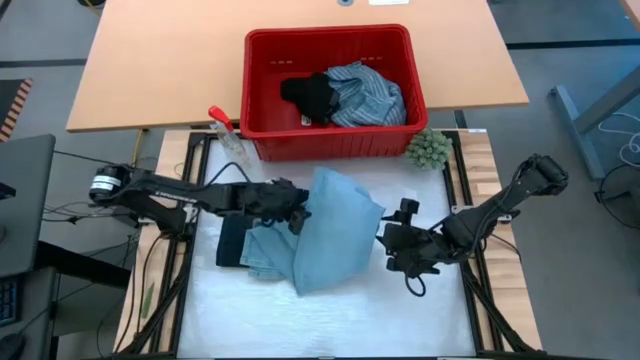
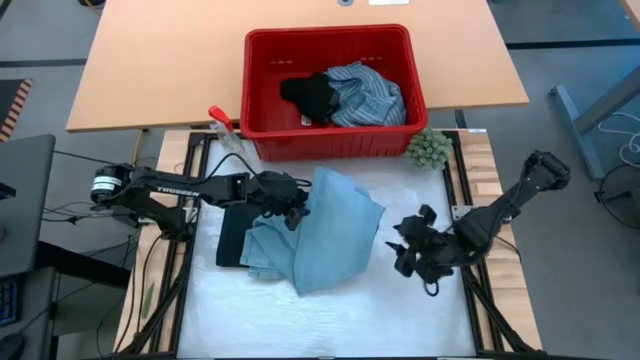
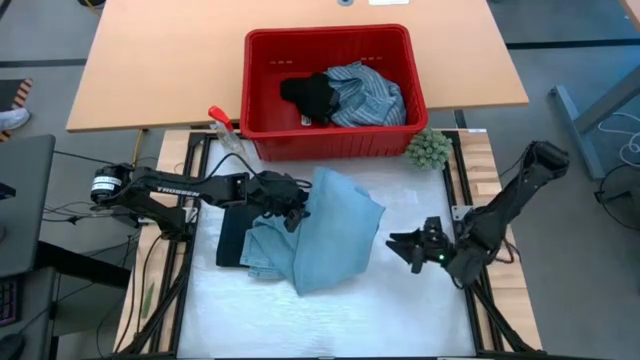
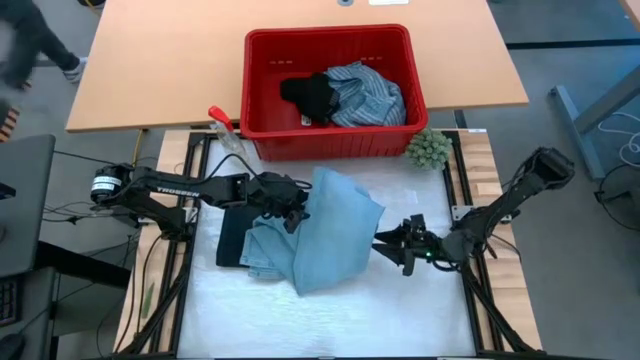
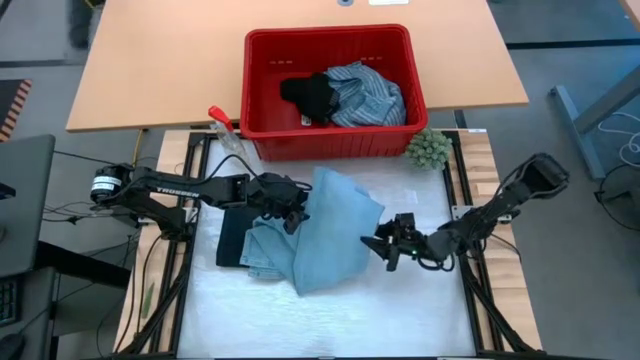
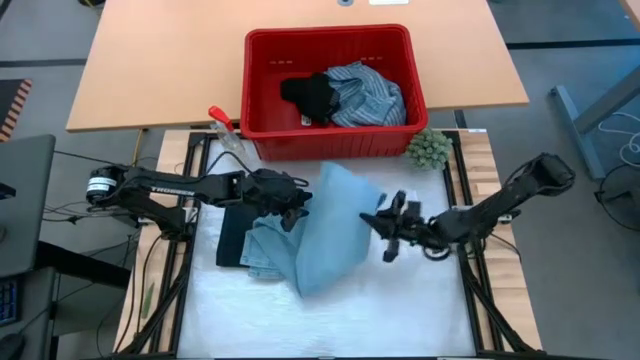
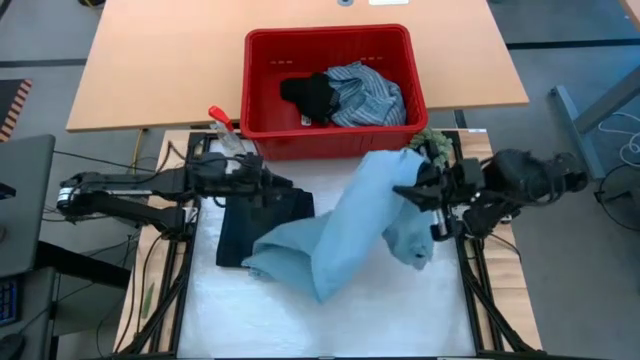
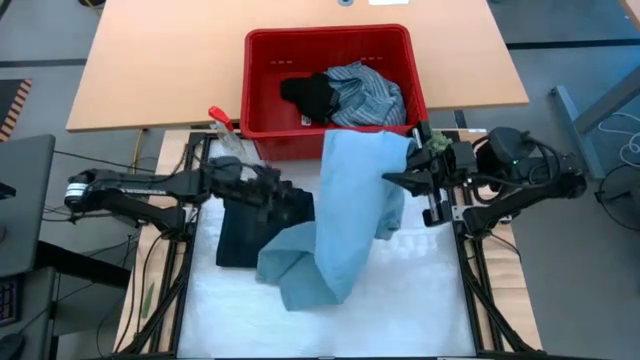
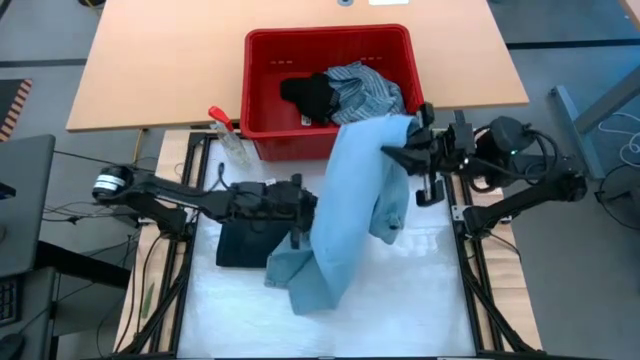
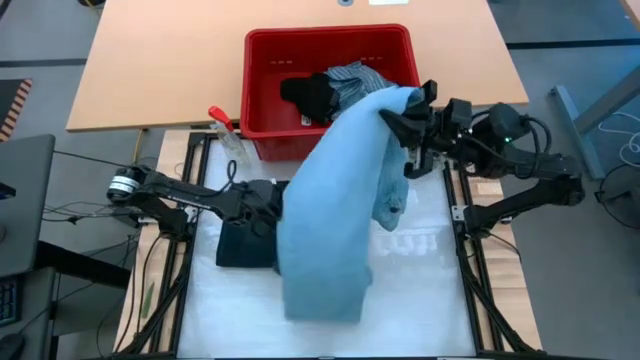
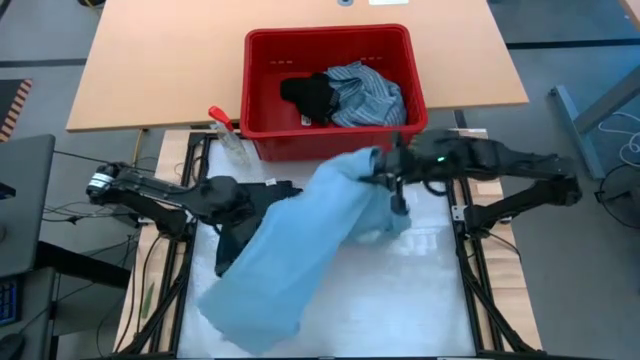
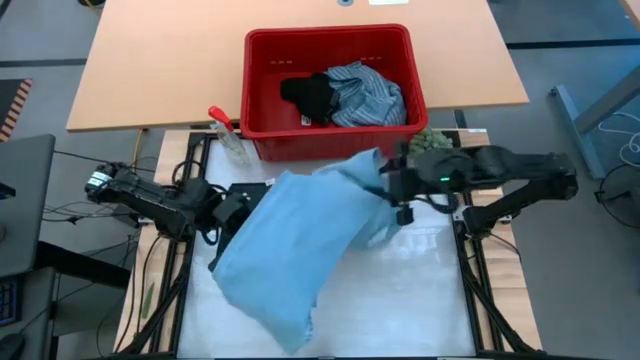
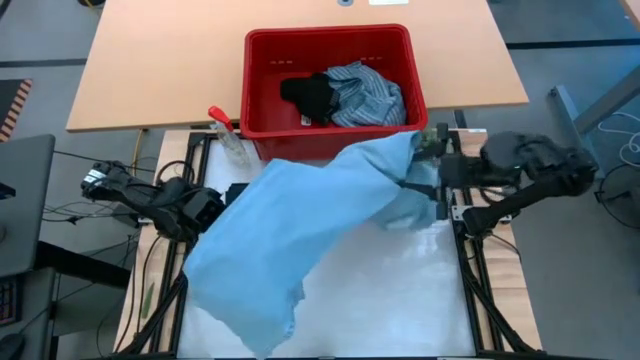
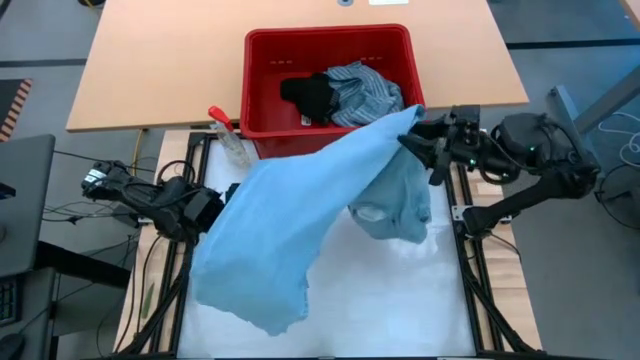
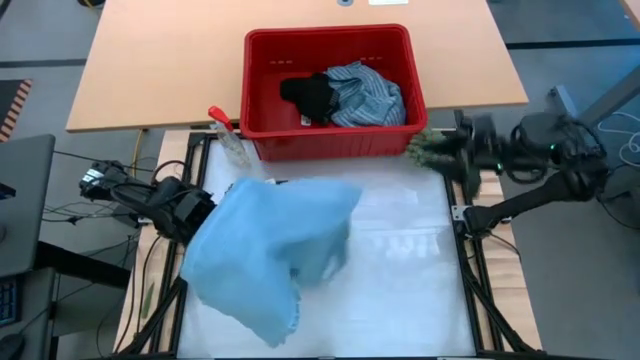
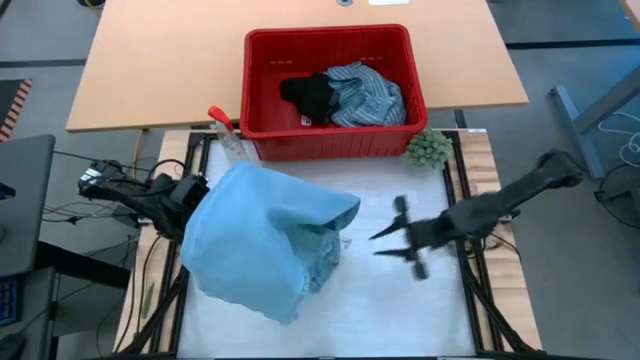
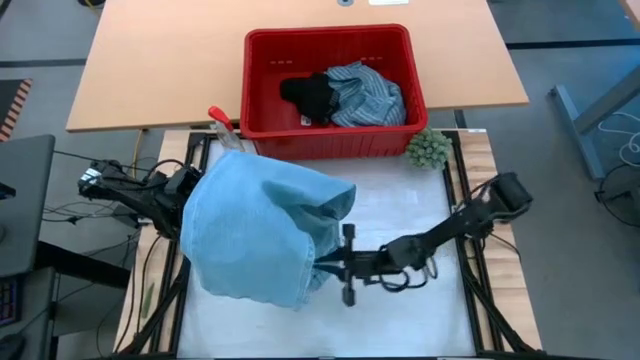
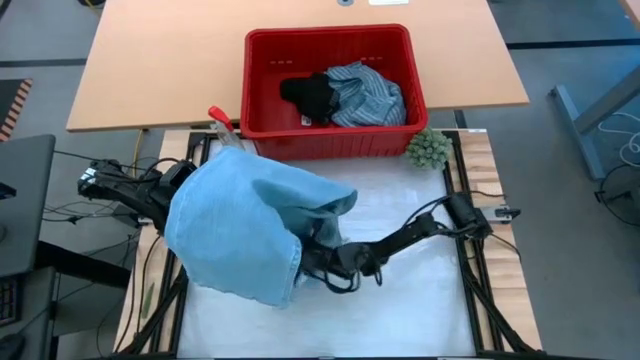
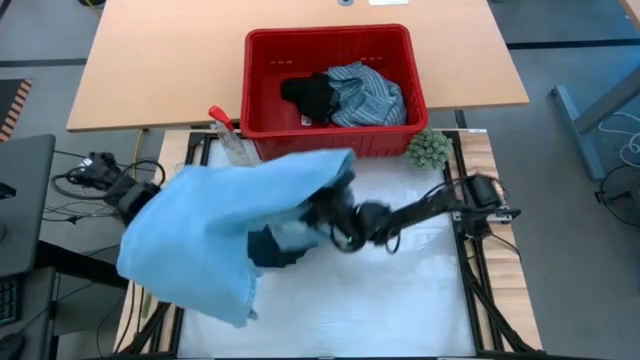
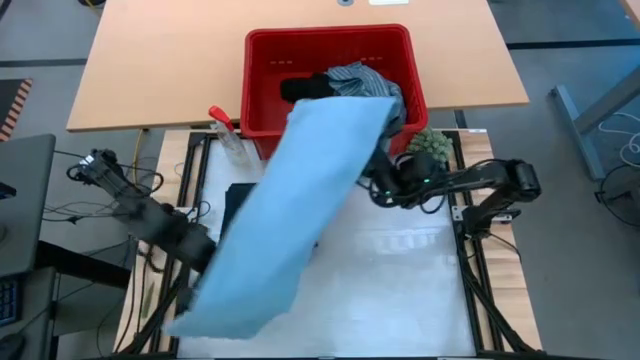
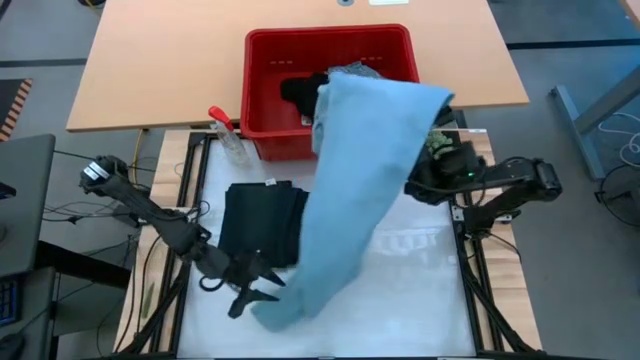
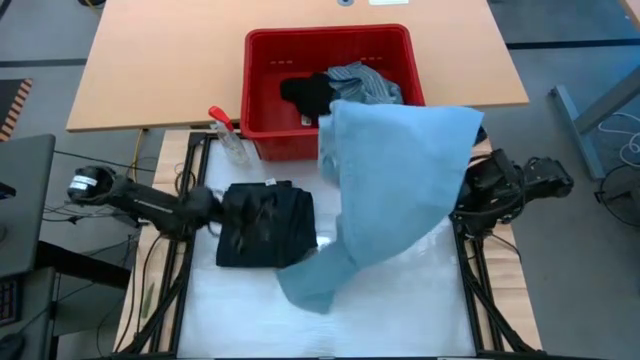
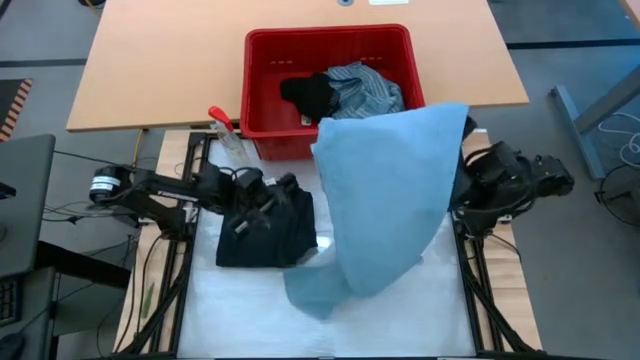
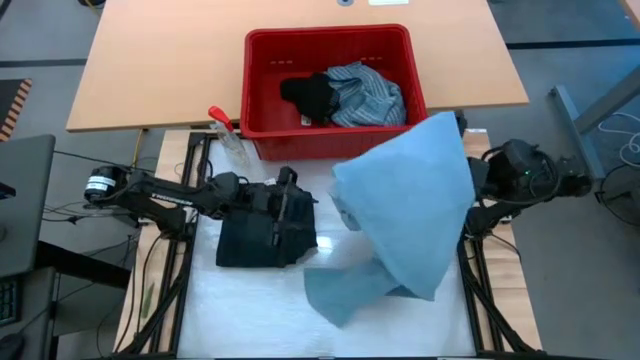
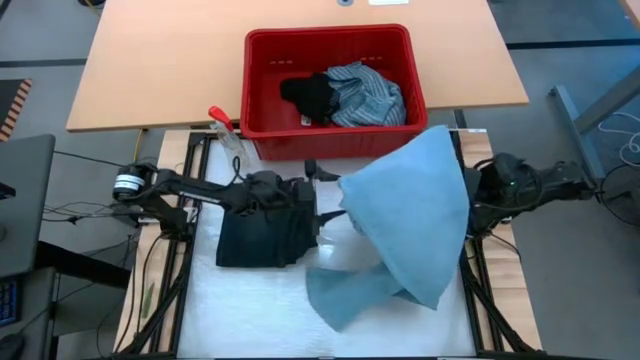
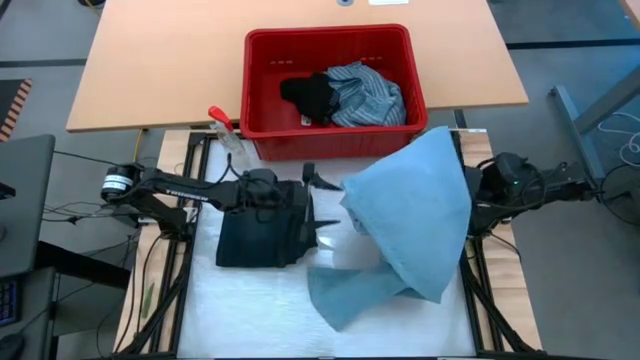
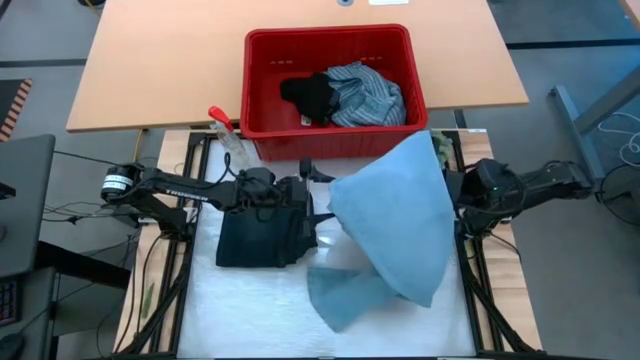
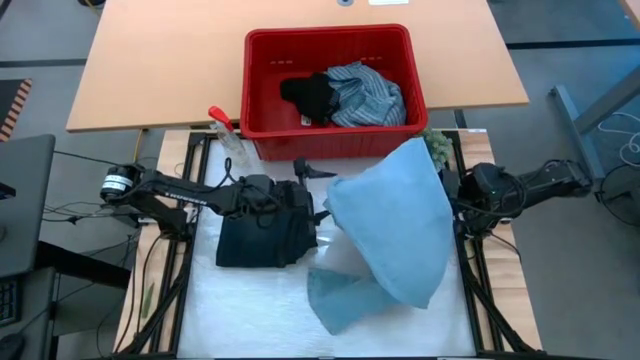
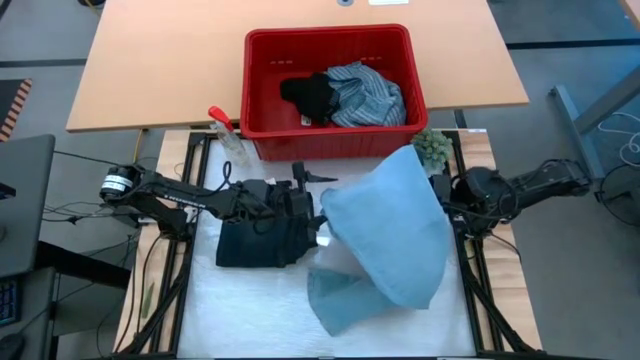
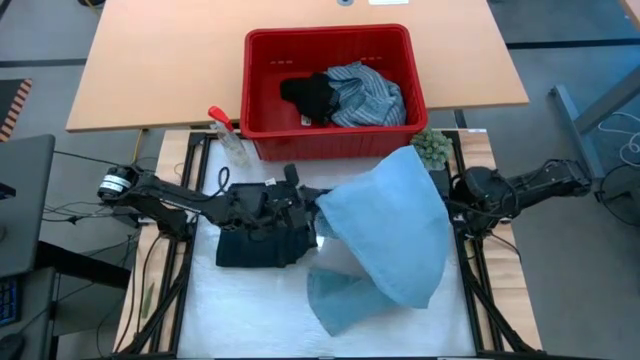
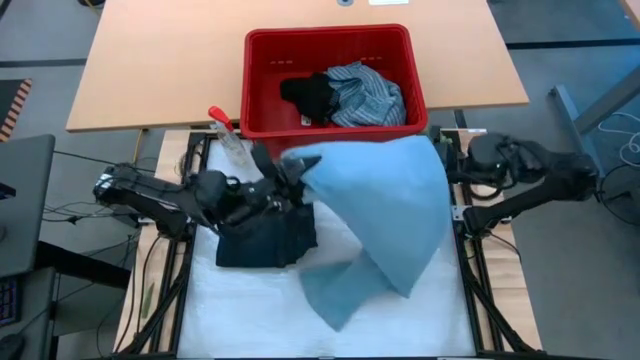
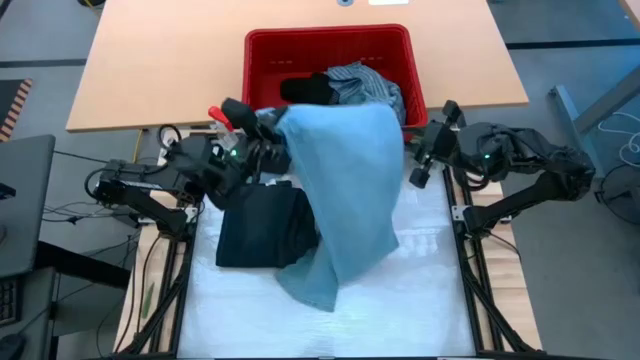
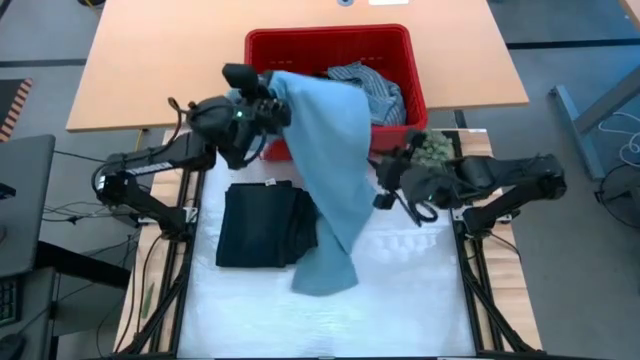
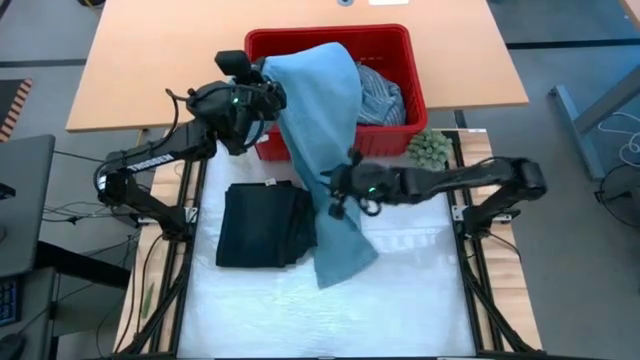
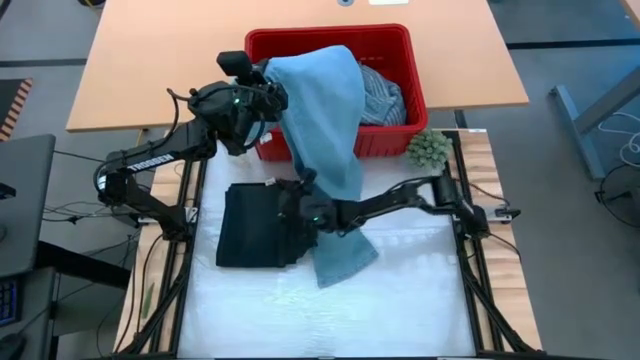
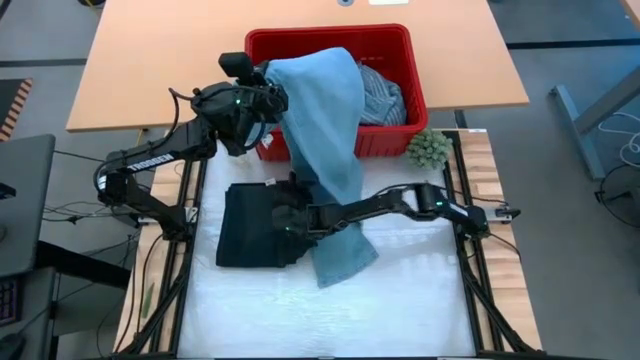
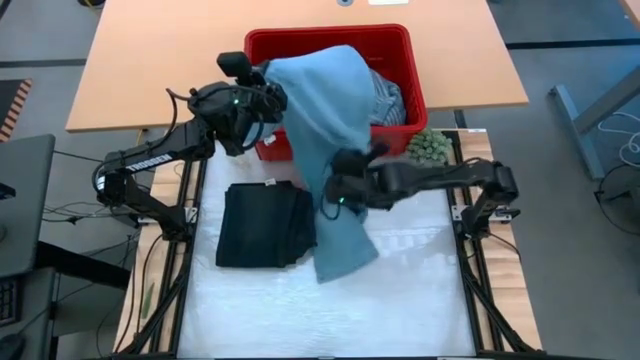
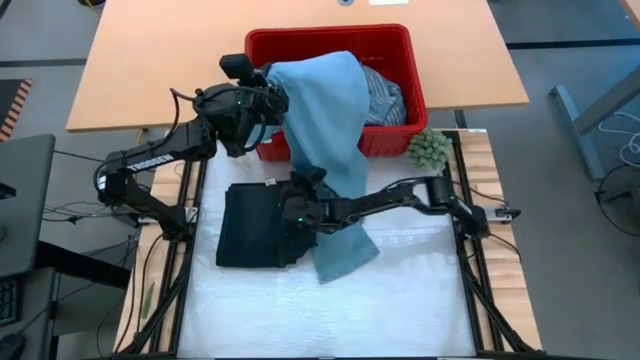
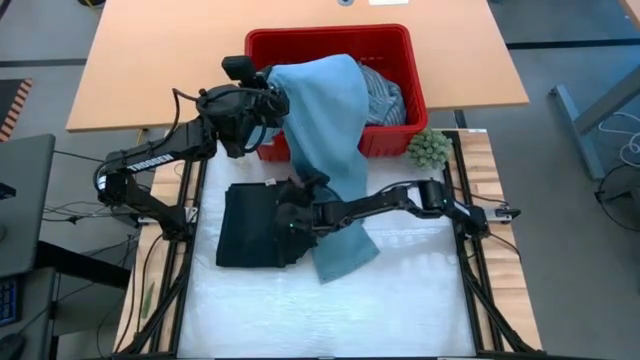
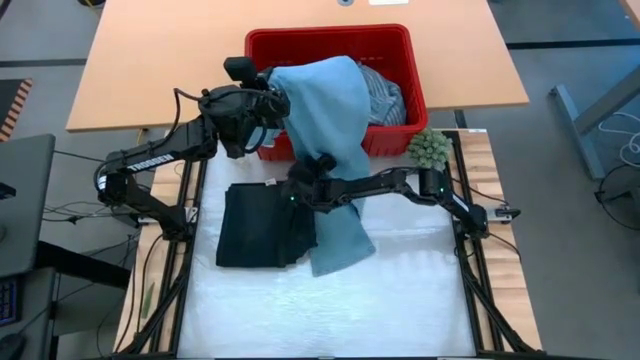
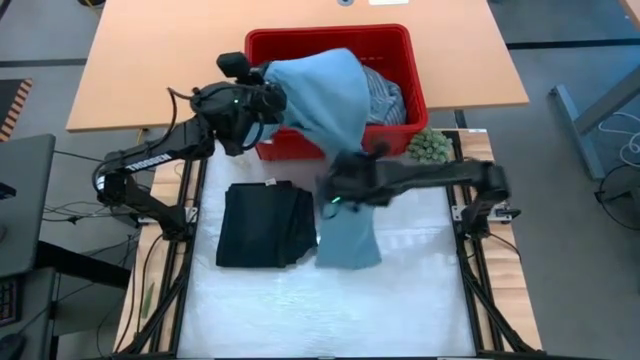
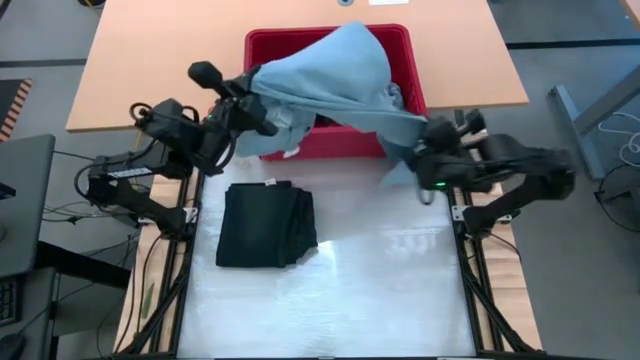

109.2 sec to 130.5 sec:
Task: Fold Laundry from Bin
Fold the light blue pants
